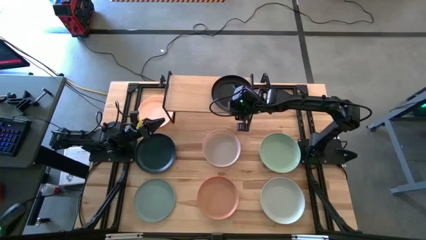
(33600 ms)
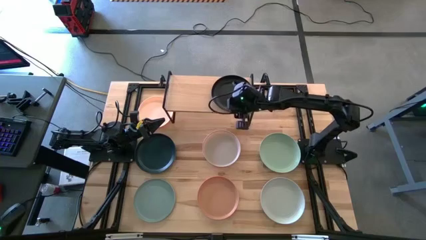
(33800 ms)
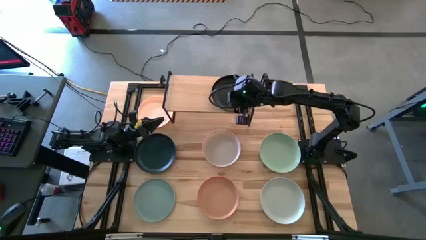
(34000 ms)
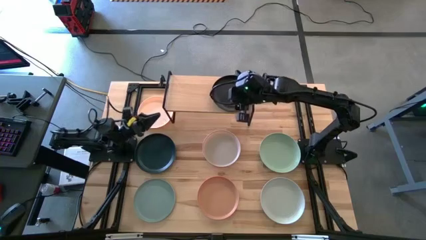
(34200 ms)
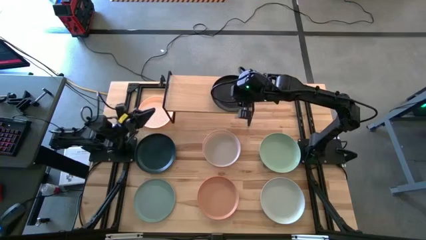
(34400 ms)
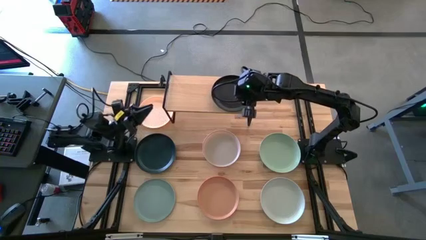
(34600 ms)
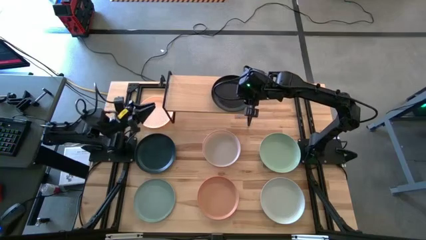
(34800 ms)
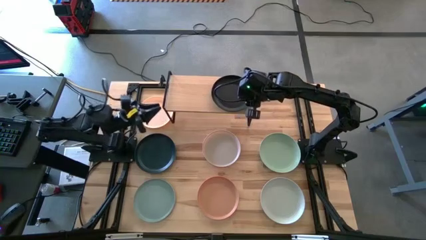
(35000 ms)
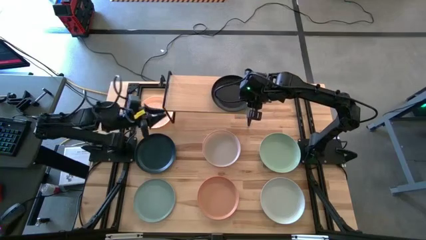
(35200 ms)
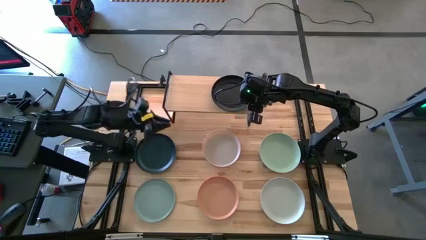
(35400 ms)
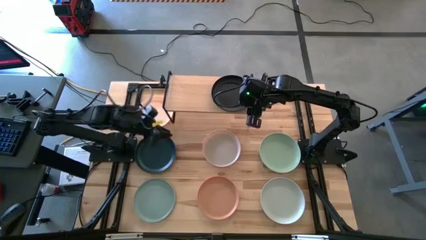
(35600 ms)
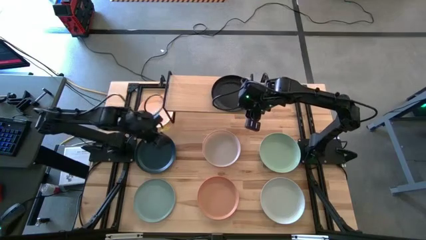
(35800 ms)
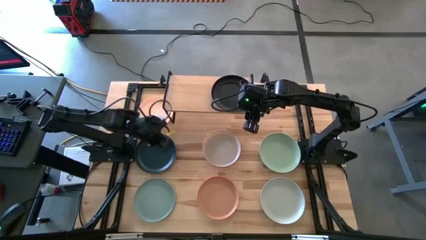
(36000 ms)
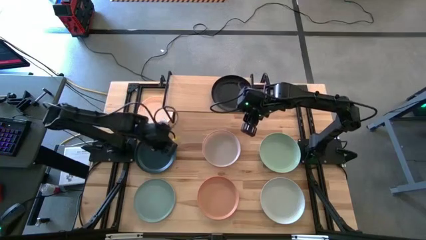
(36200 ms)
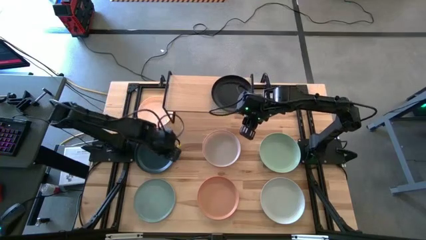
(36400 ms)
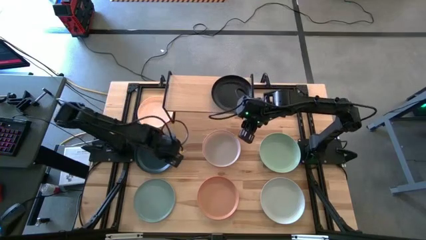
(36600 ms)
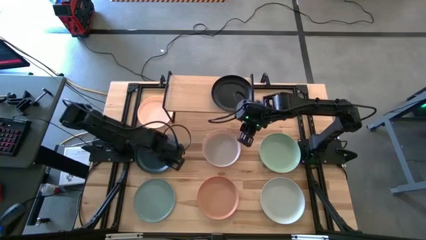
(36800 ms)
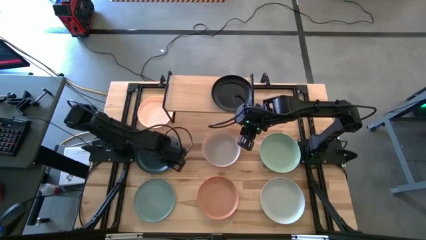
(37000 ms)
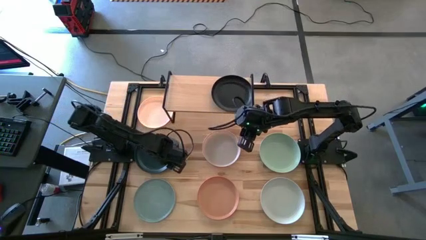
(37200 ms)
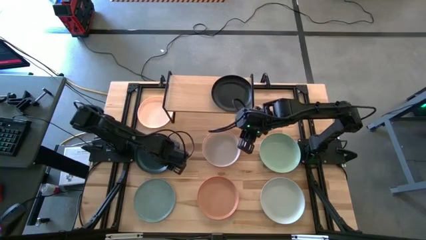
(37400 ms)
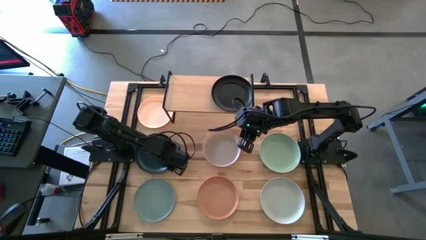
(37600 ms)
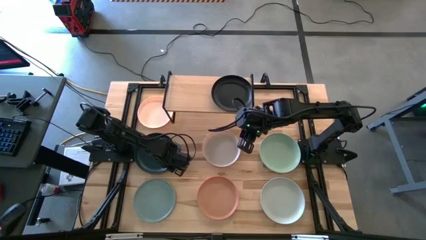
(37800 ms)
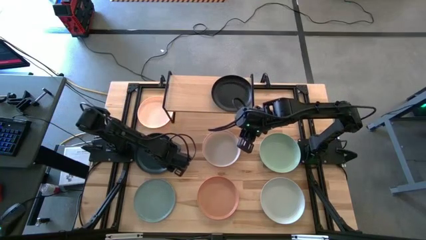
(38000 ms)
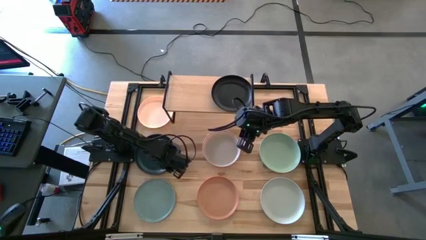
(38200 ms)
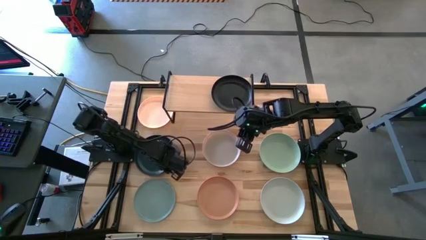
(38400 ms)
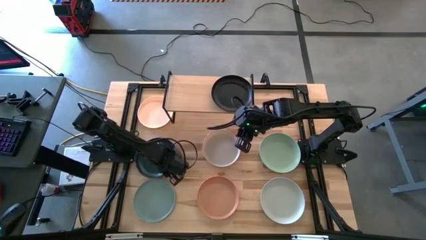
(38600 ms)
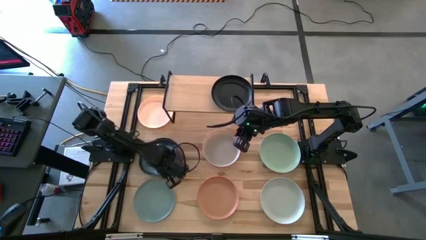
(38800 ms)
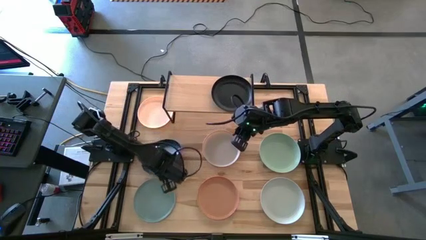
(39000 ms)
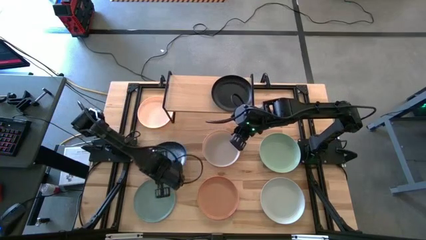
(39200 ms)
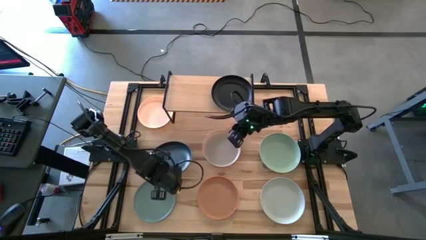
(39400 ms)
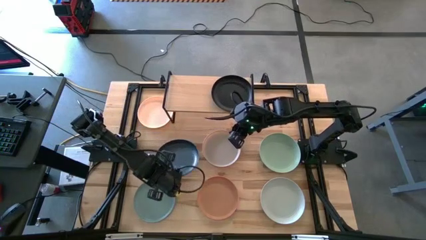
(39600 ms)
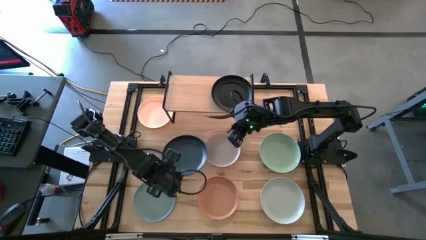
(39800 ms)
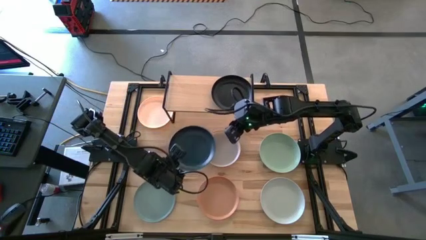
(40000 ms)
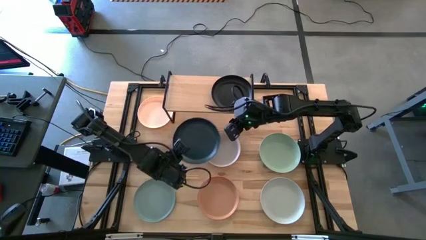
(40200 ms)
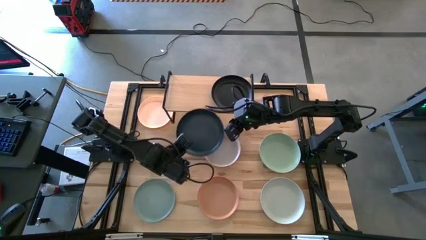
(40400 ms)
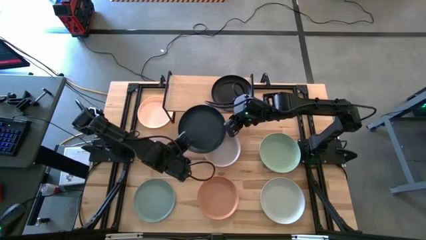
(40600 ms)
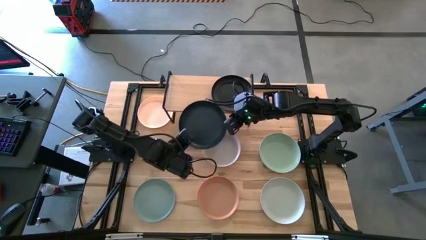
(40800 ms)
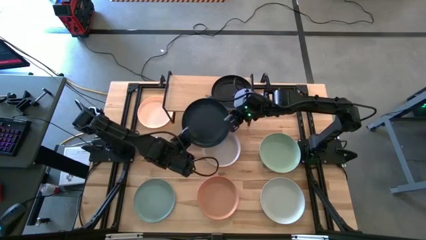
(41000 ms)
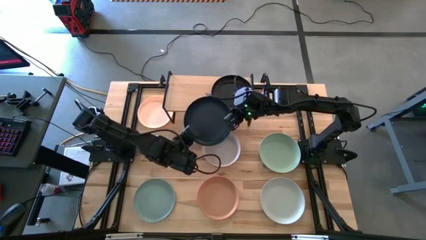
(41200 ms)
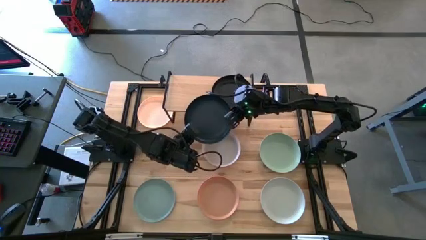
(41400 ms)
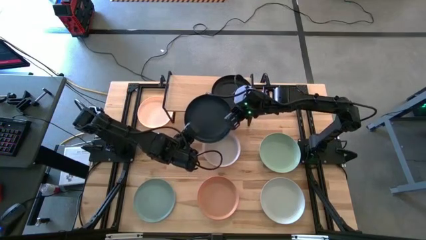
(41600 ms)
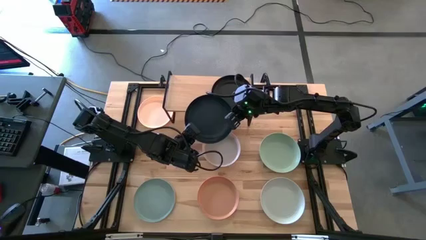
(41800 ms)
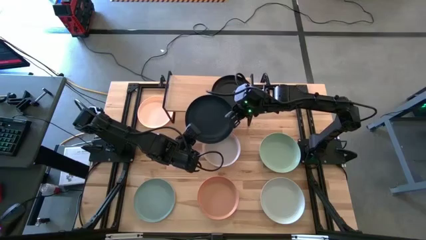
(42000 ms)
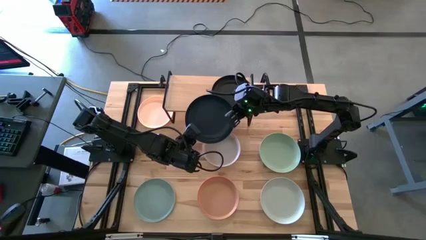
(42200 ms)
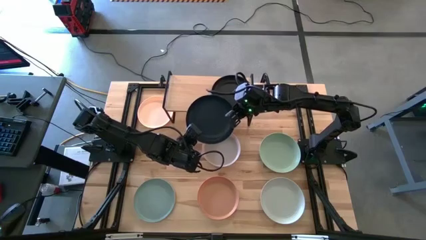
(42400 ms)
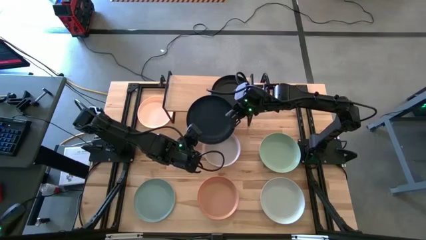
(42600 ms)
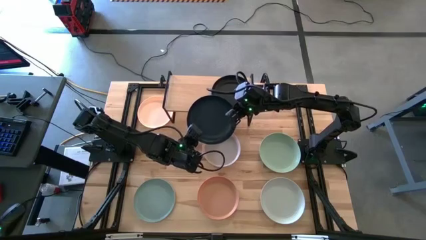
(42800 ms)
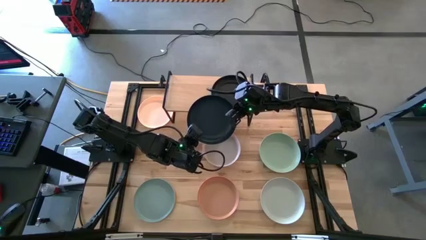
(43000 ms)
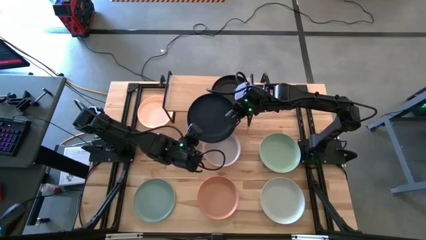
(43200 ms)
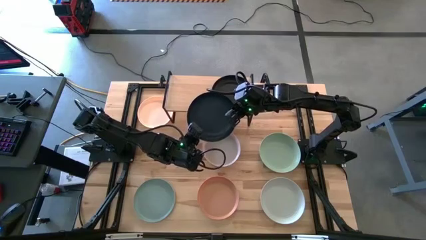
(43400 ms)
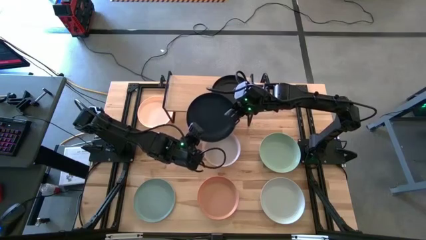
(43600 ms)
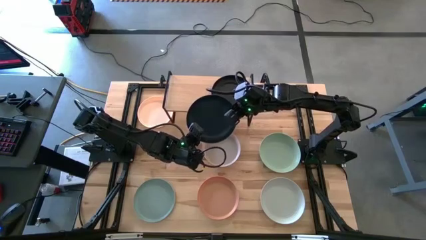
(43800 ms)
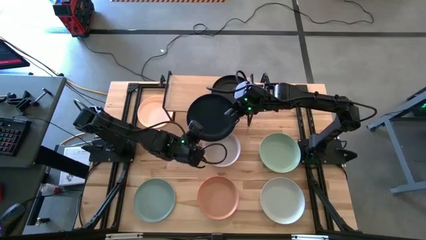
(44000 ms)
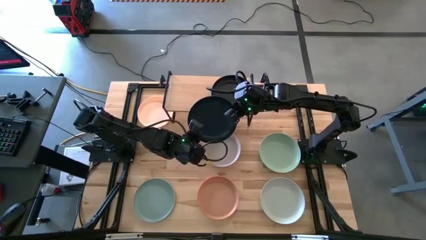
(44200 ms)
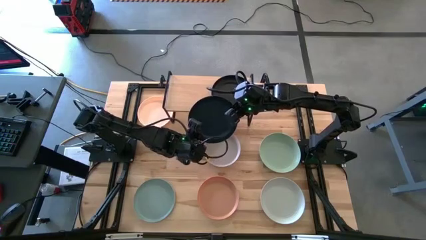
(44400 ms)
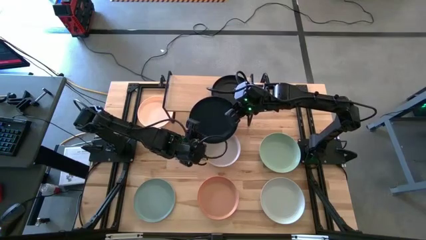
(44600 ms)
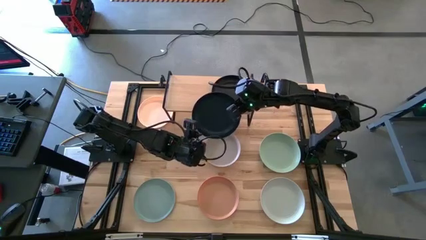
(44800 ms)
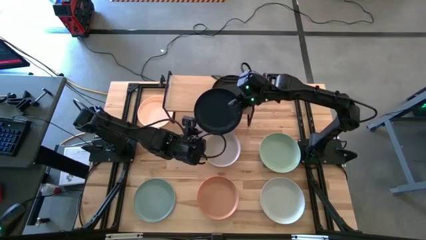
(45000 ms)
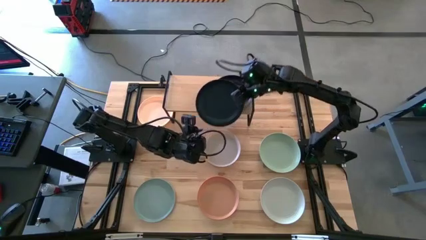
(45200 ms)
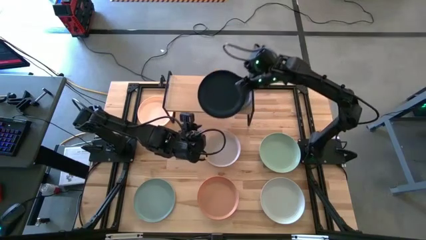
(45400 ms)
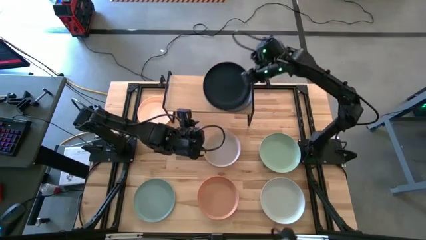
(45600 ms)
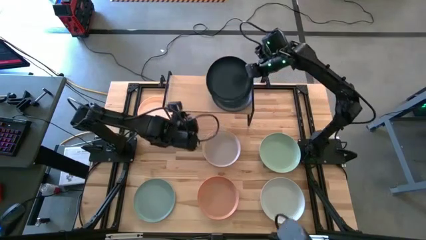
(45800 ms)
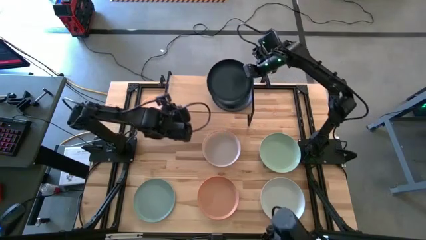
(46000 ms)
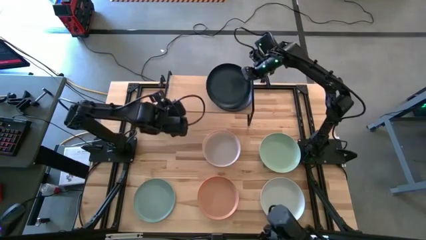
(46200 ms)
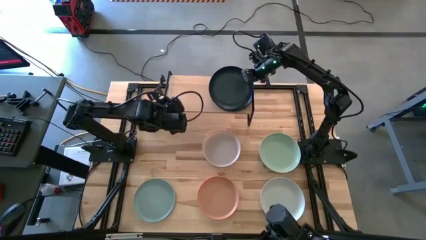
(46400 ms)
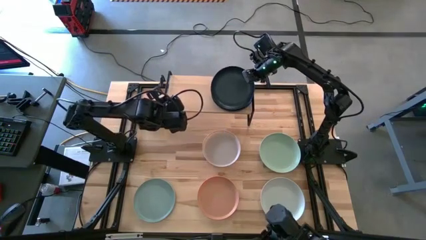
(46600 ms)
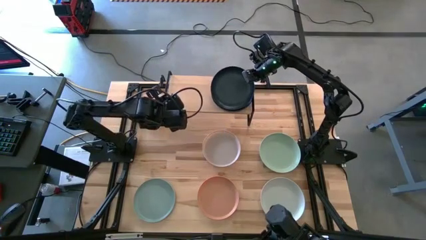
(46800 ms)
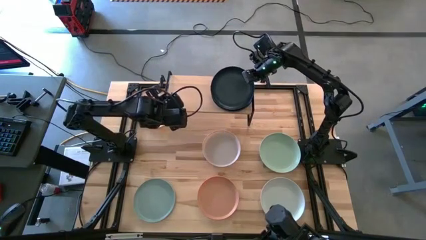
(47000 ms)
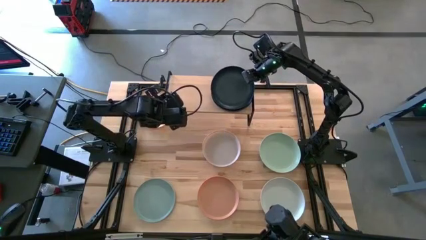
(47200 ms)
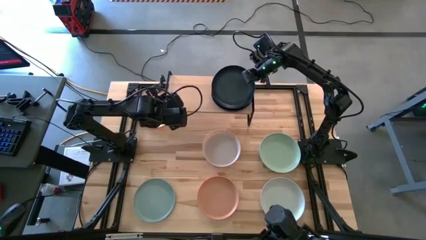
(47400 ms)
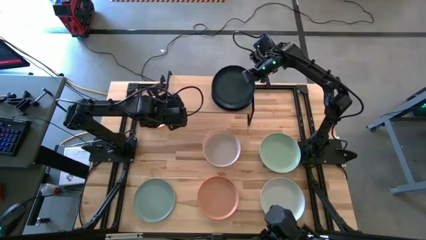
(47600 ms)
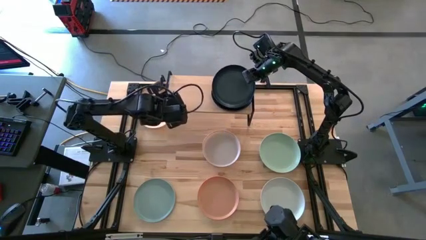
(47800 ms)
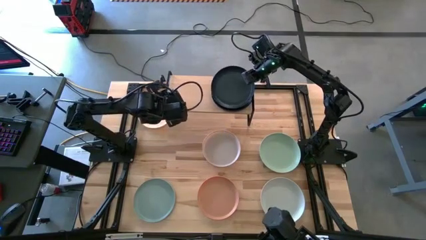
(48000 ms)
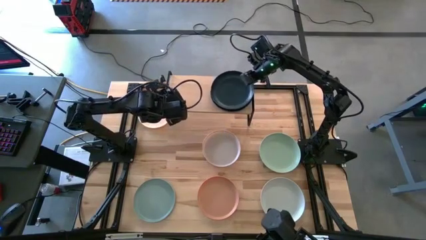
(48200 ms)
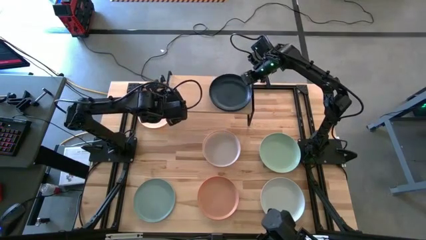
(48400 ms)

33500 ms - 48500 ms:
Task: Place and stack plates onto a shelf
Stack the blue plate on top of the black plate
